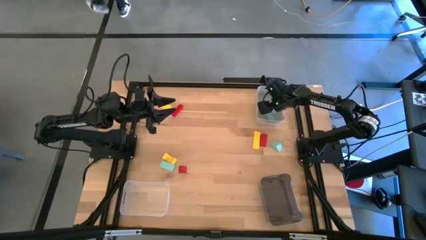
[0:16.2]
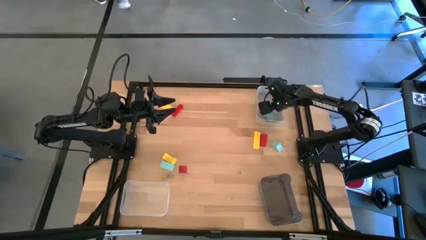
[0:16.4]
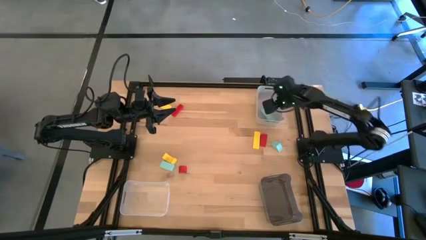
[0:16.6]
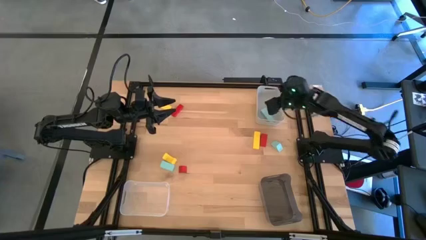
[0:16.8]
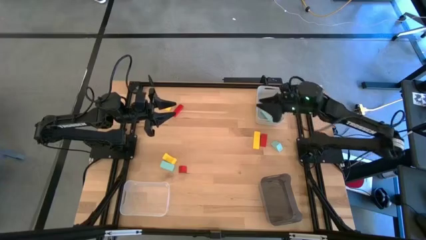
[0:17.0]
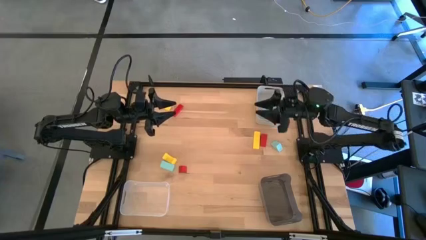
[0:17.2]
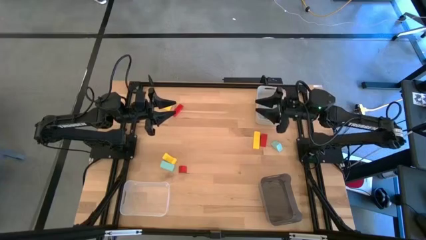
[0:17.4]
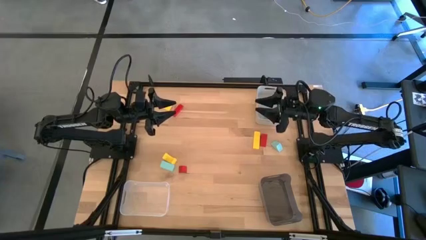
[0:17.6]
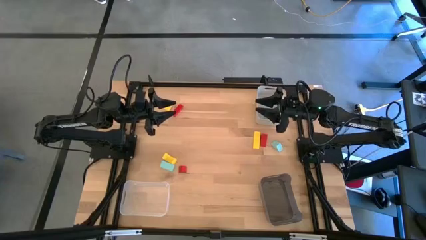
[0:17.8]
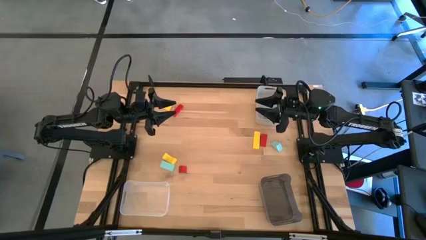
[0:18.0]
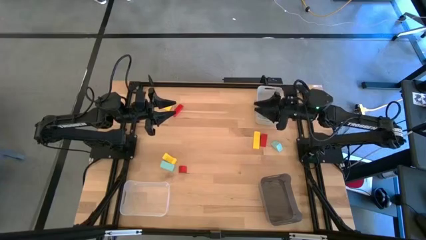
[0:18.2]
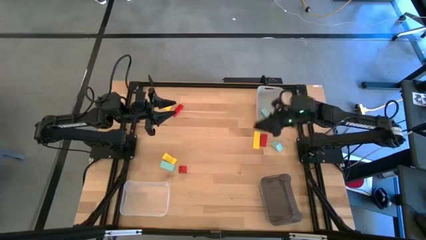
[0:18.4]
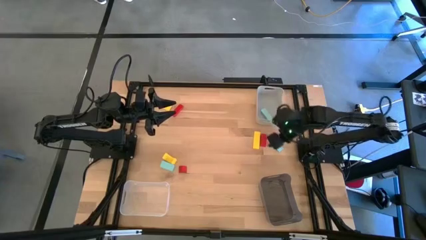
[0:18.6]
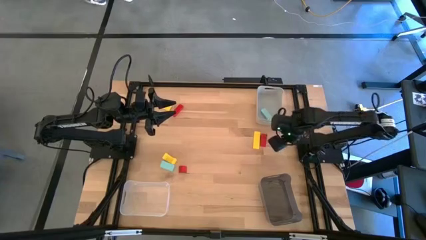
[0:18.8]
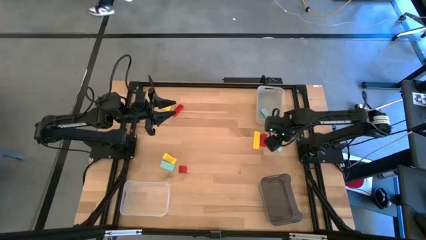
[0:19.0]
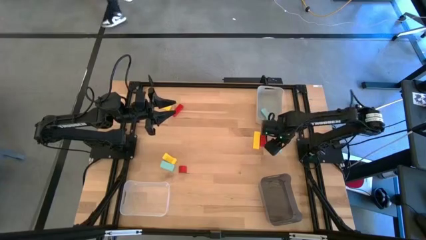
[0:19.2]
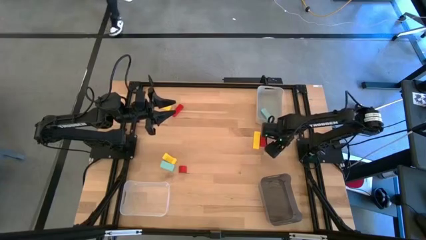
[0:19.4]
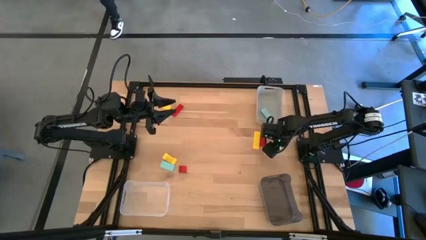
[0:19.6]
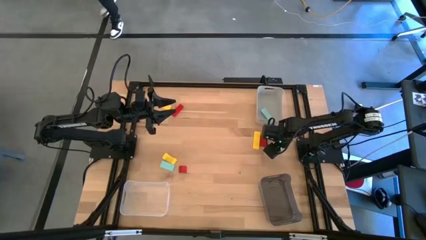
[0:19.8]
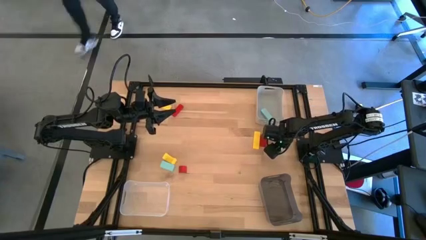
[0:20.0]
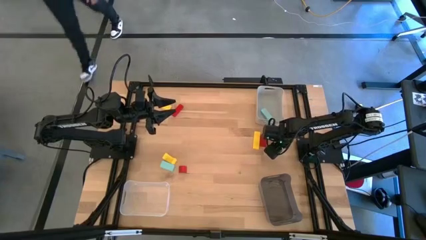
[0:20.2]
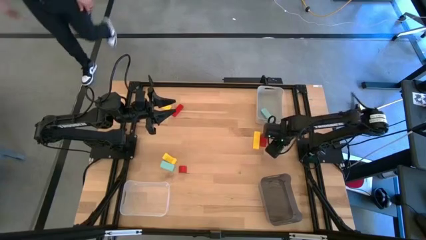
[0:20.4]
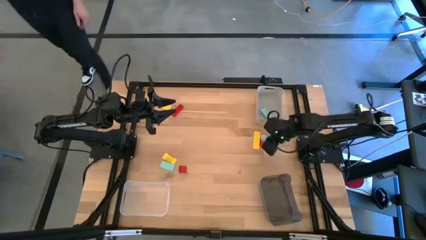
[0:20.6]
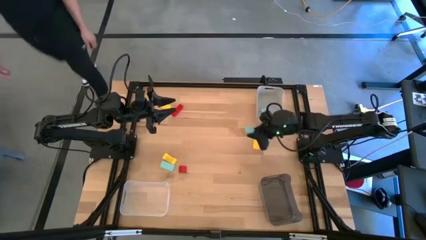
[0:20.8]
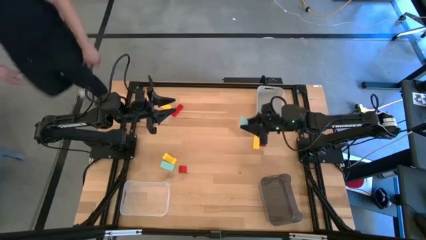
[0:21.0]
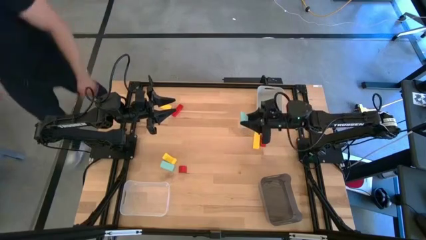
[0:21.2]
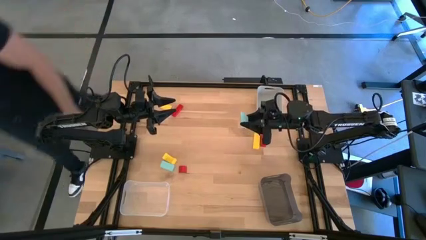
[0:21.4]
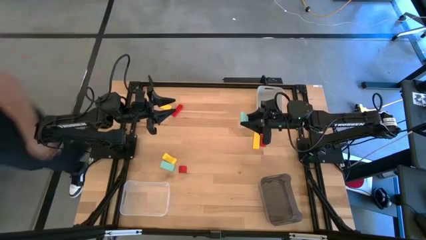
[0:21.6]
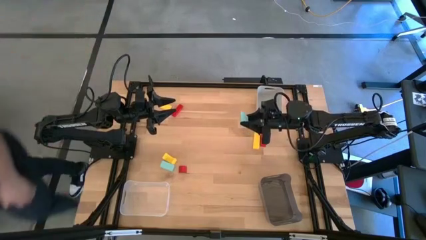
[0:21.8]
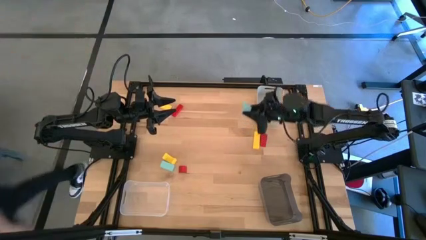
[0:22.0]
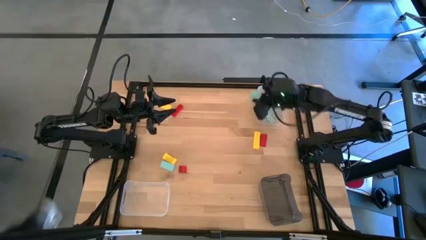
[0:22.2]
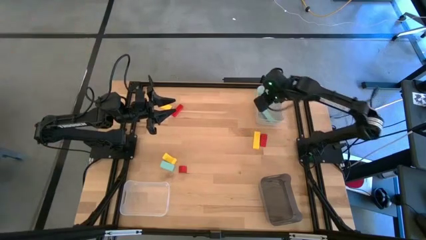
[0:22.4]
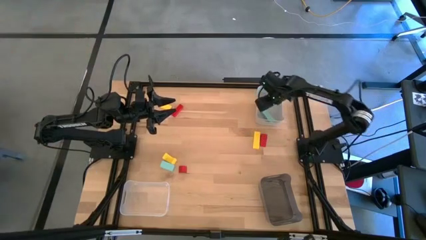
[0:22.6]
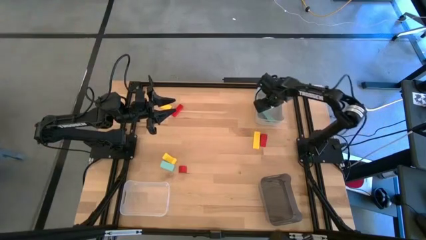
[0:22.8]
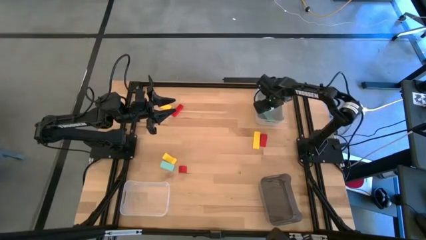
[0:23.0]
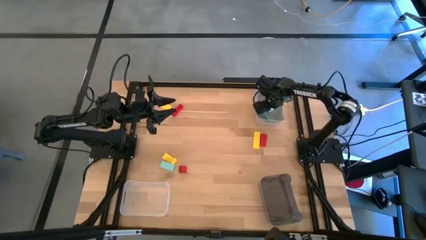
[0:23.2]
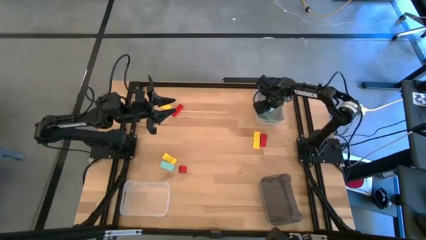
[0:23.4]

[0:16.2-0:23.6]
Task: Sort & place blocks by color
Put the right blue block into the gray bin

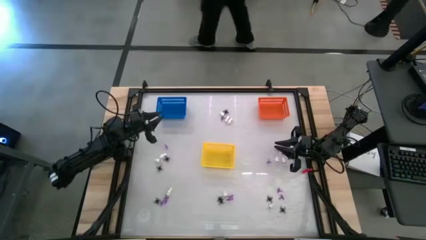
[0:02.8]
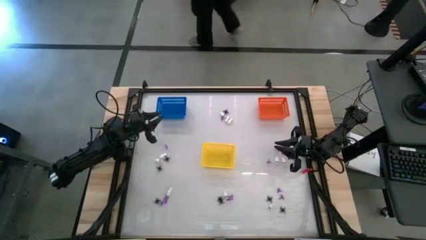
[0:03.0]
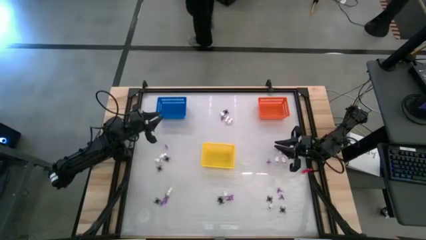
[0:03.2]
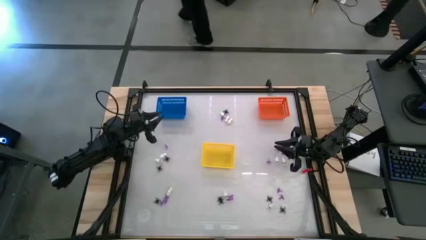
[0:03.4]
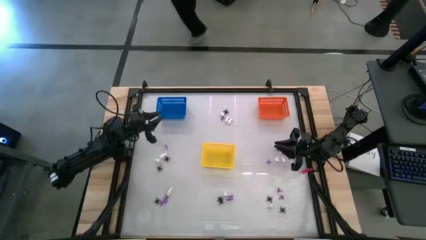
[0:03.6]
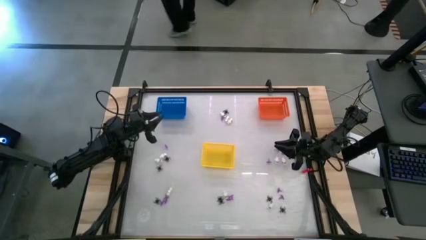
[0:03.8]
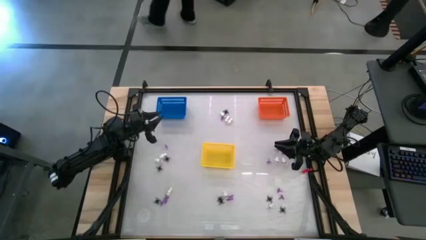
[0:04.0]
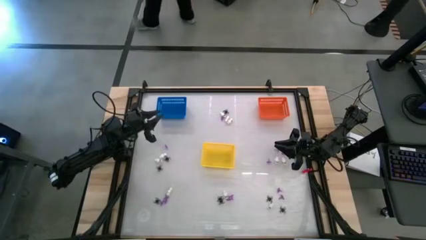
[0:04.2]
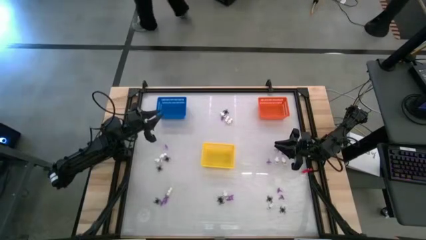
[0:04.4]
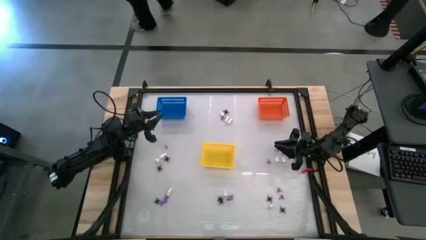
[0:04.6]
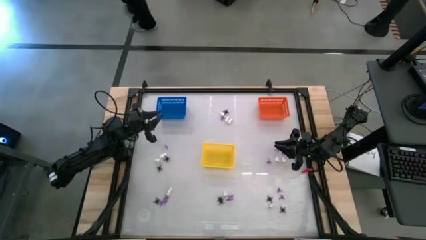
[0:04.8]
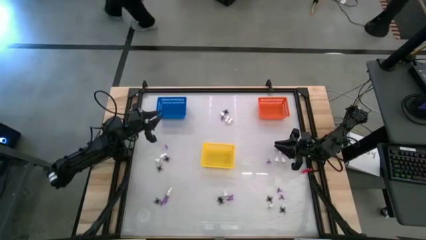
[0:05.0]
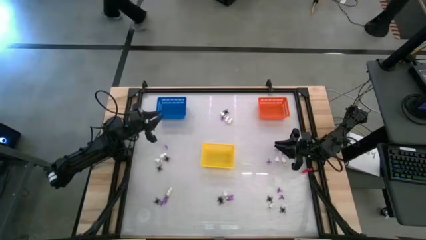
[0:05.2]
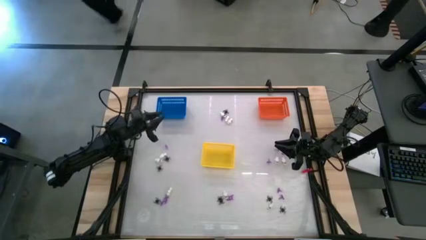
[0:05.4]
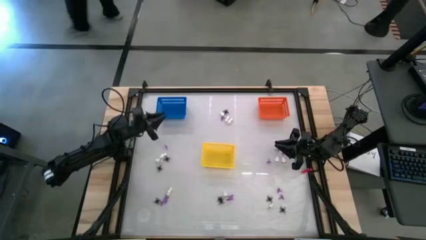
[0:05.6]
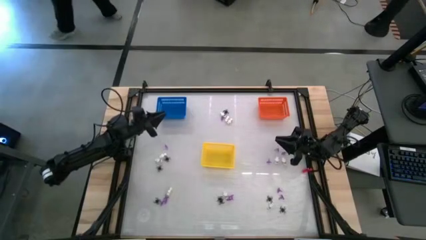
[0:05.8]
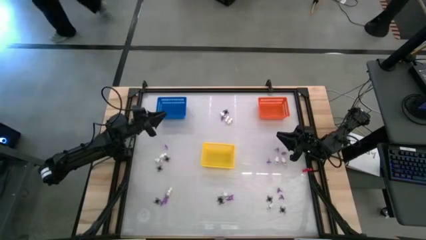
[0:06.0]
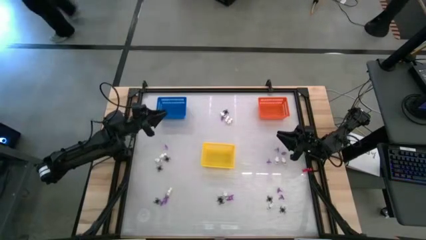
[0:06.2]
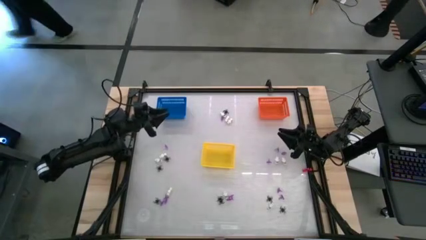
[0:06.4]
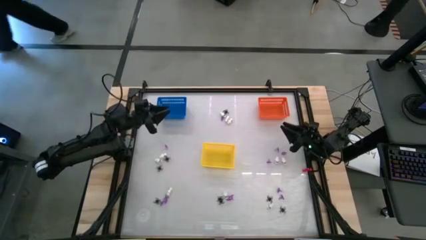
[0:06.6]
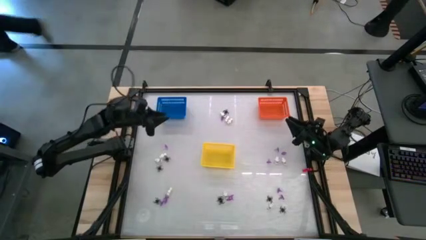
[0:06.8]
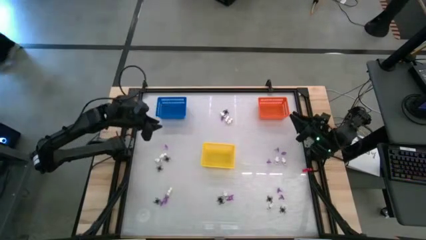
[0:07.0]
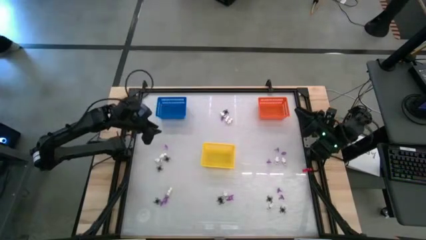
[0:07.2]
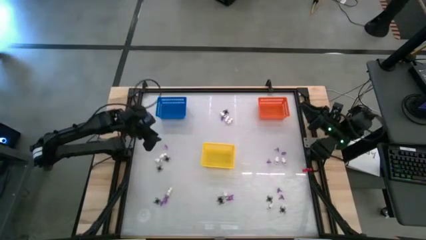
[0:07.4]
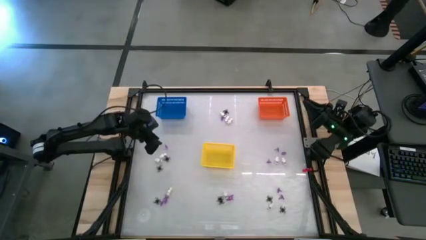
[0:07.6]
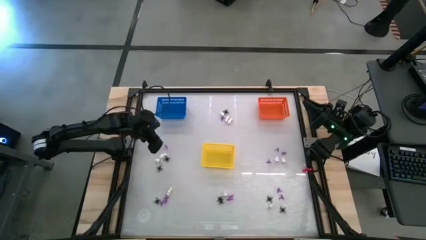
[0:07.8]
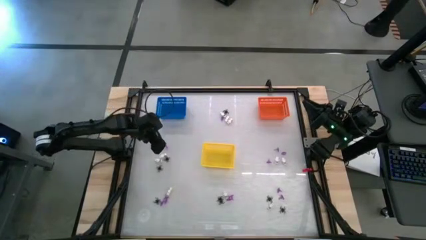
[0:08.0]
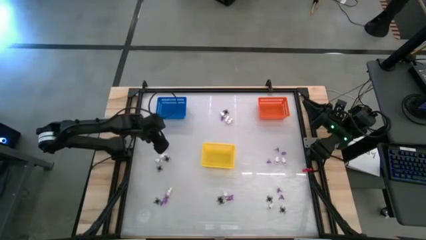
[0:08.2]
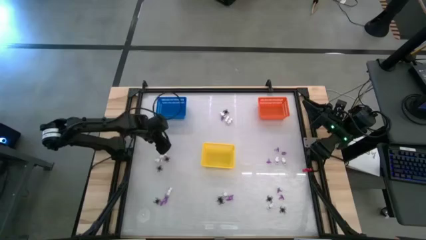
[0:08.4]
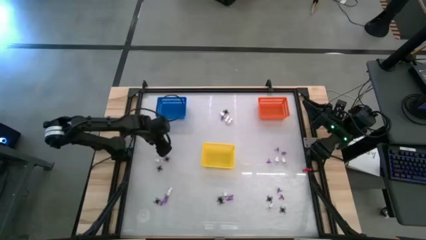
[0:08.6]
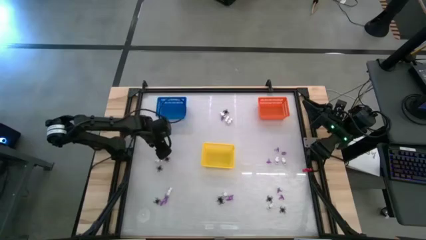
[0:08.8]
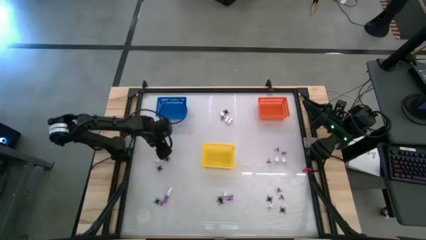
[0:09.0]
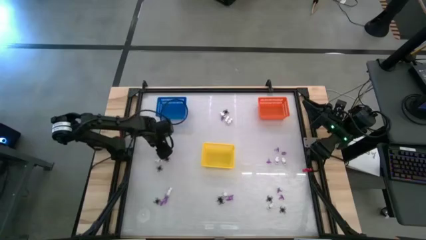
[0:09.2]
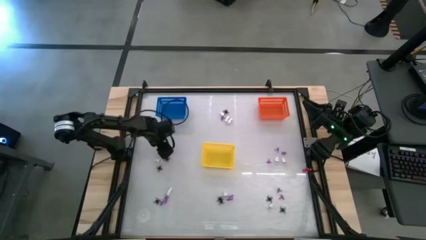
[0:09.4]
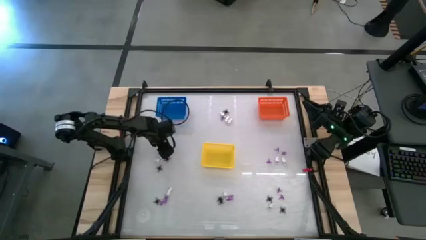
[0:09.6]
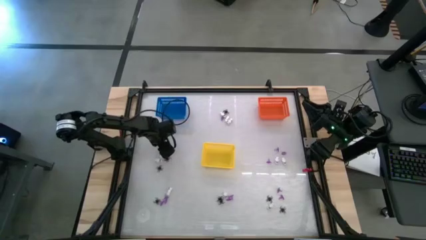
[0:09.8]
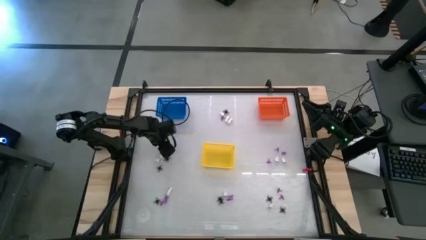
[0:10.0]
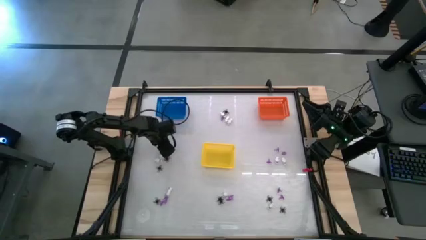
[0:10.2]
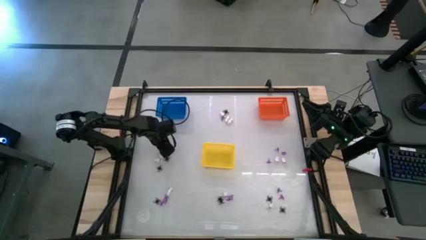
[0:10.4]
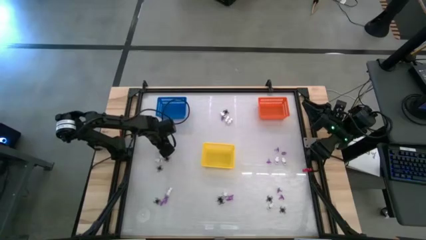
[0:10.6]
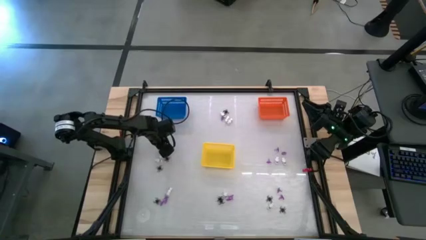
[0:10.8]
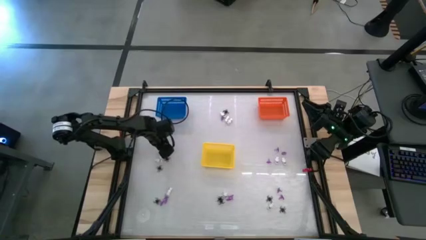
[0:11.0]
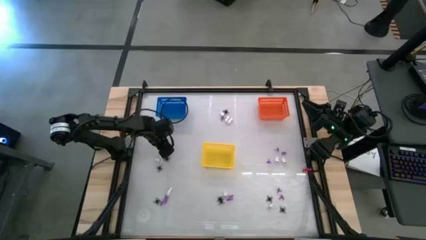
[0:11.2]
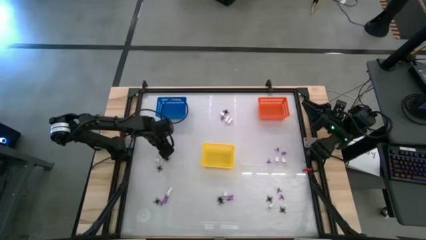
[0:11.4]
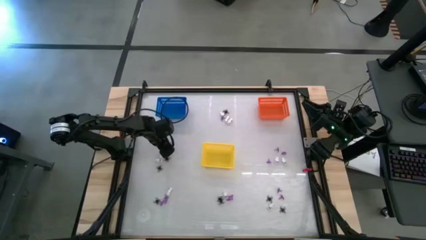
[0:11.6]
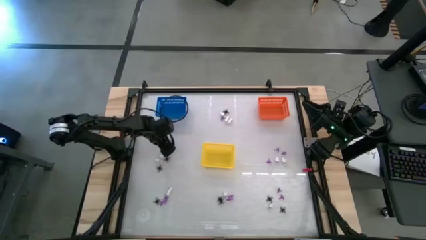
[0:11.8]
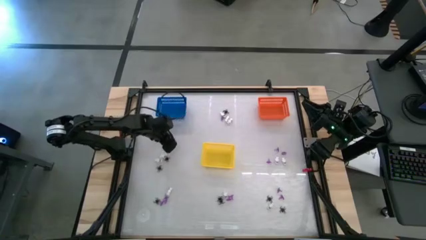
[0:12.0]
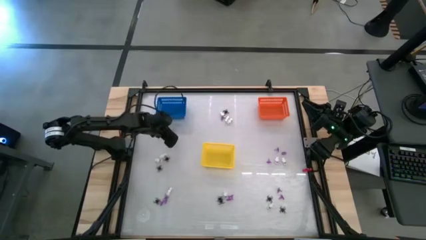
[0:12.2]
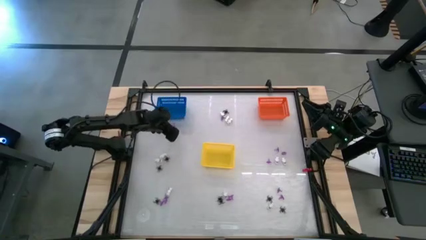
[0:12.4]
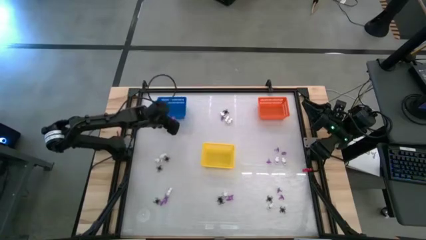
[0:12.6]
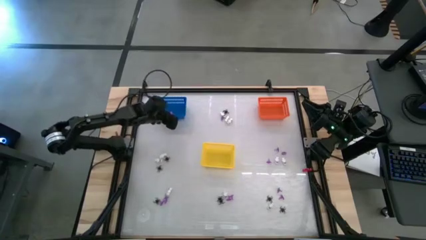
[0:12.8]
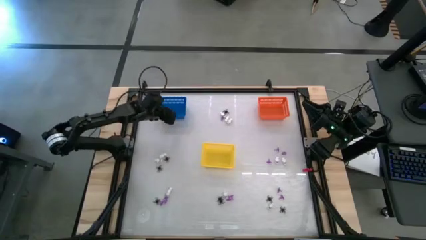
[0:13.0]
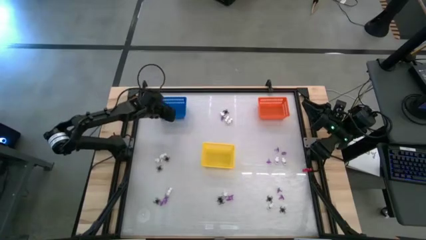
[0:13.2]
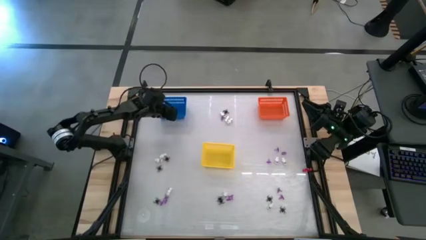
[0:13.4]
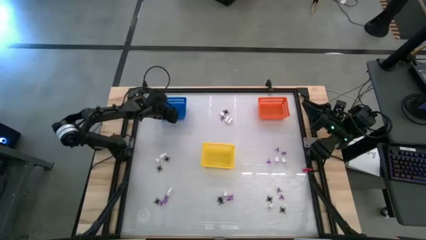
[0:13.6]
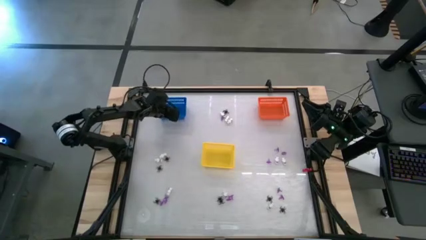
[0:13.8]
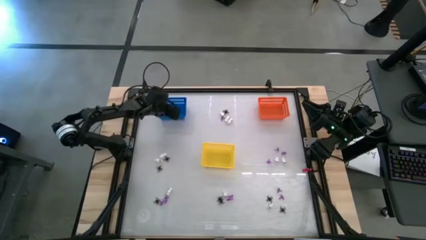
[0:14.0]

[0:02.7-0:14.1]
Task: Sort Halloween decoration
Put the purple witch hat toy into the blue bin
